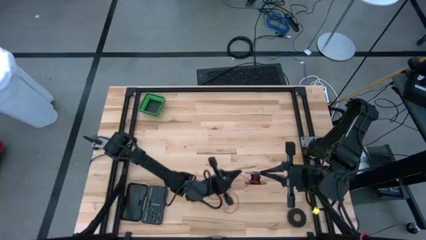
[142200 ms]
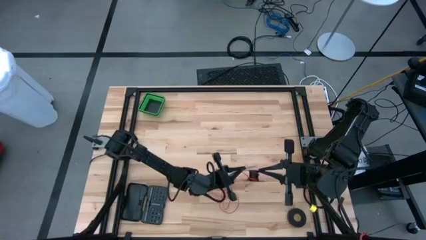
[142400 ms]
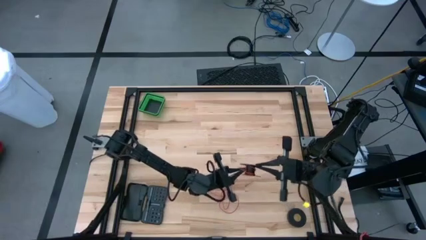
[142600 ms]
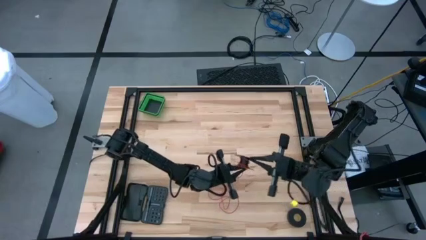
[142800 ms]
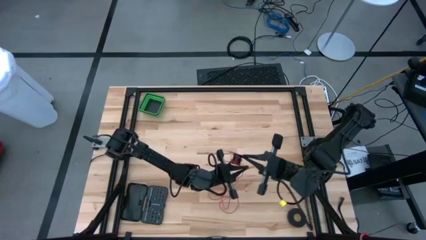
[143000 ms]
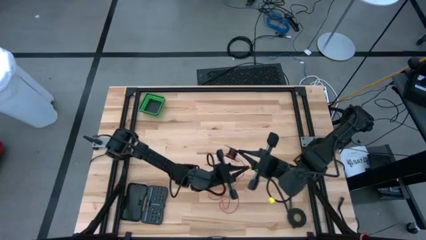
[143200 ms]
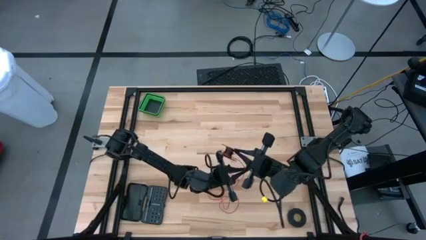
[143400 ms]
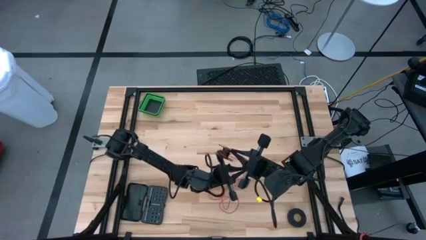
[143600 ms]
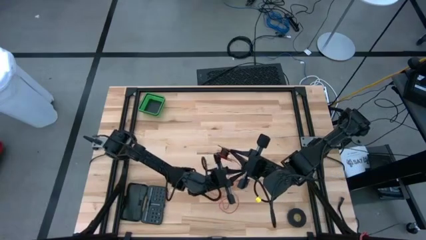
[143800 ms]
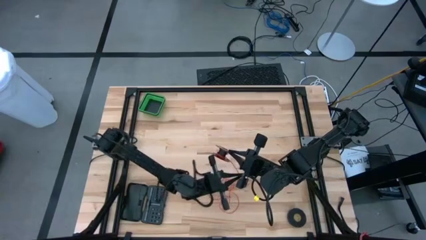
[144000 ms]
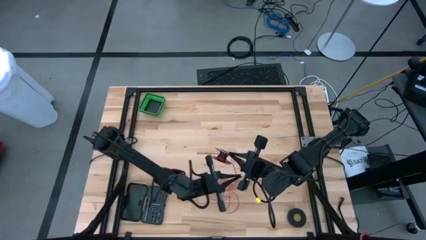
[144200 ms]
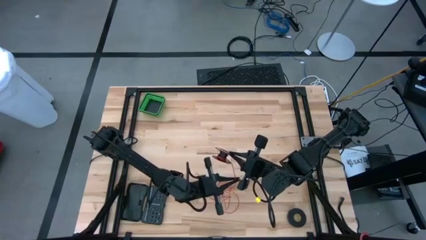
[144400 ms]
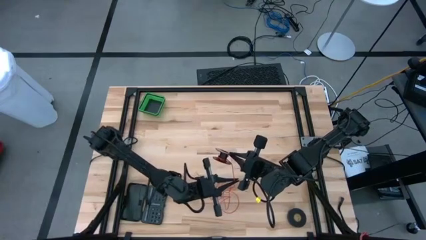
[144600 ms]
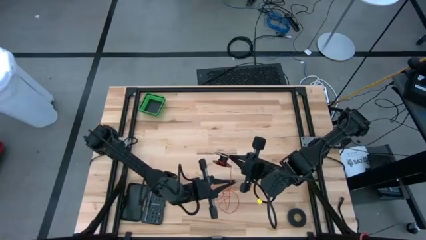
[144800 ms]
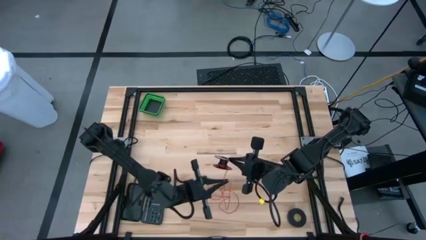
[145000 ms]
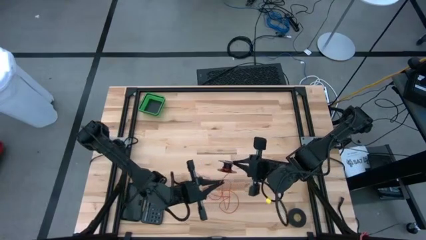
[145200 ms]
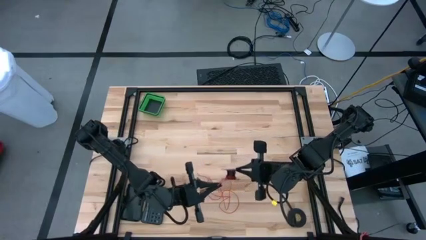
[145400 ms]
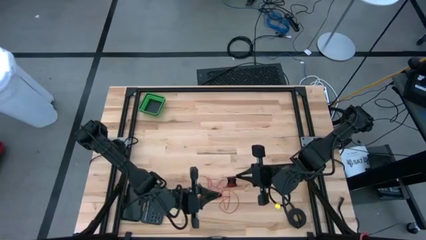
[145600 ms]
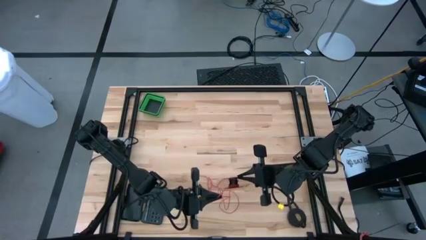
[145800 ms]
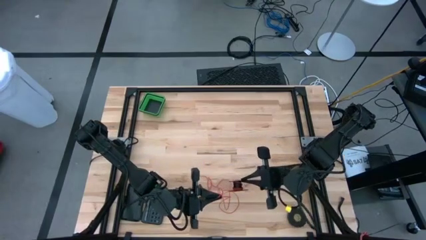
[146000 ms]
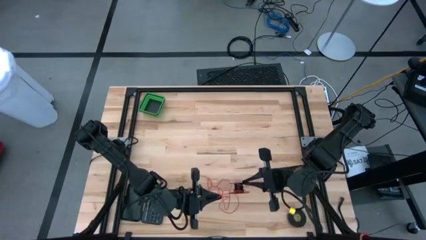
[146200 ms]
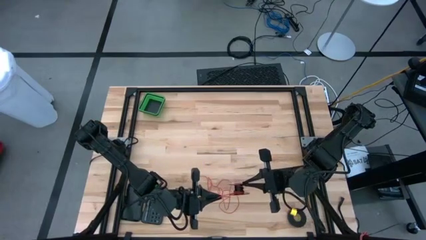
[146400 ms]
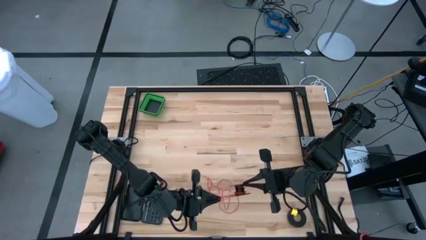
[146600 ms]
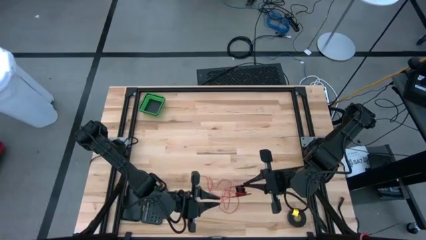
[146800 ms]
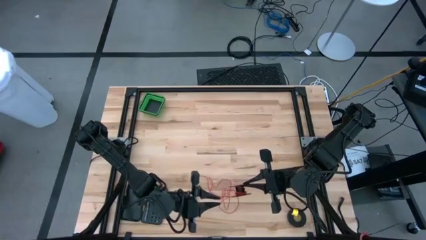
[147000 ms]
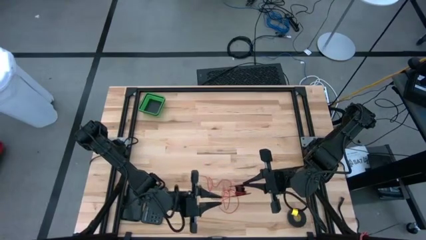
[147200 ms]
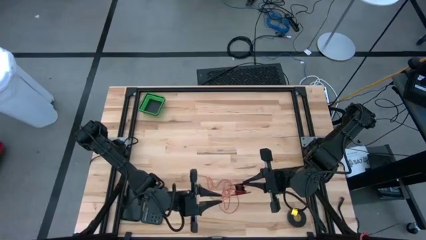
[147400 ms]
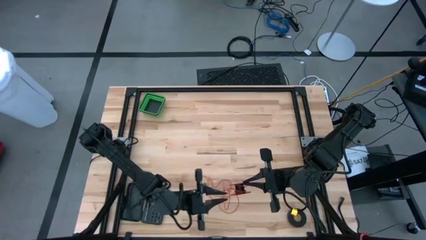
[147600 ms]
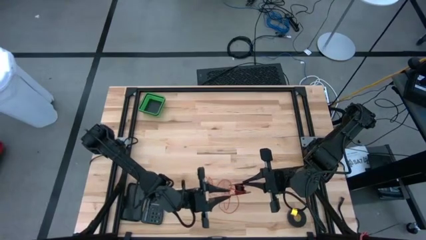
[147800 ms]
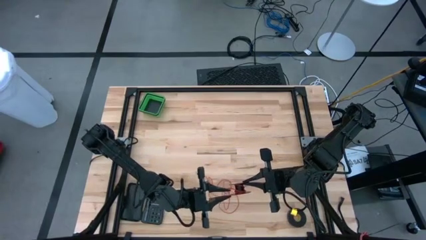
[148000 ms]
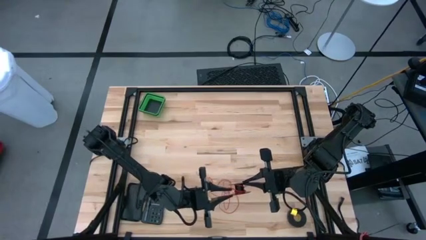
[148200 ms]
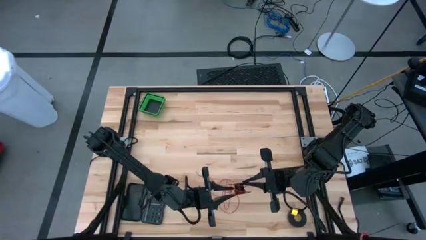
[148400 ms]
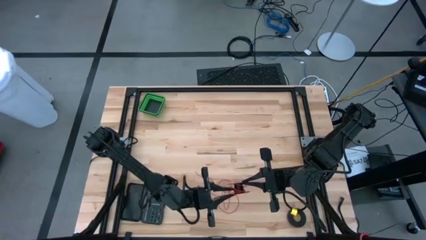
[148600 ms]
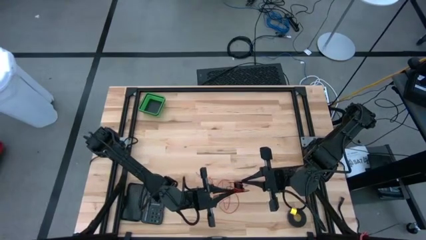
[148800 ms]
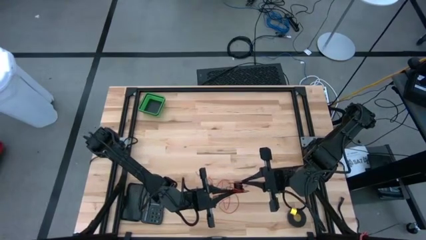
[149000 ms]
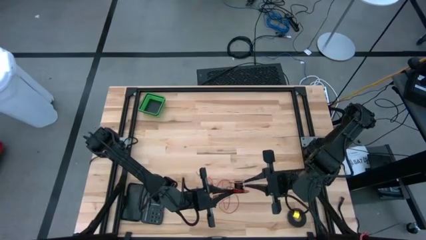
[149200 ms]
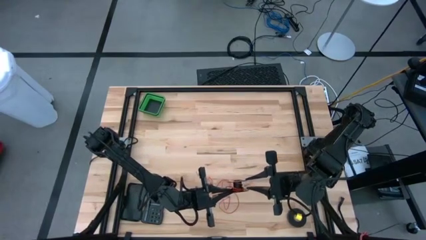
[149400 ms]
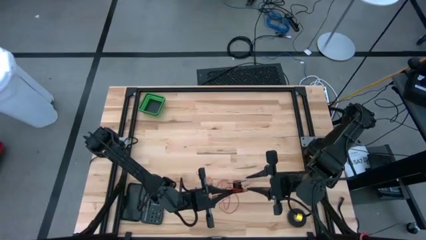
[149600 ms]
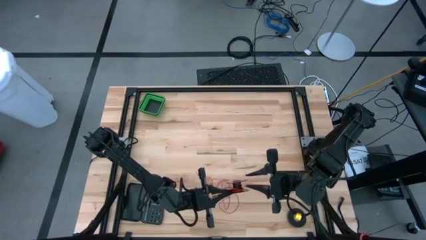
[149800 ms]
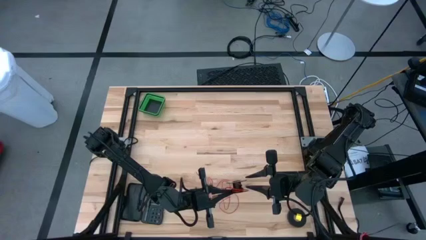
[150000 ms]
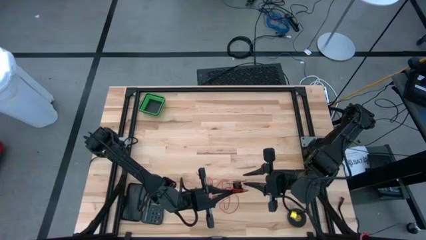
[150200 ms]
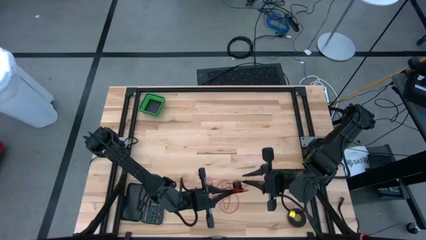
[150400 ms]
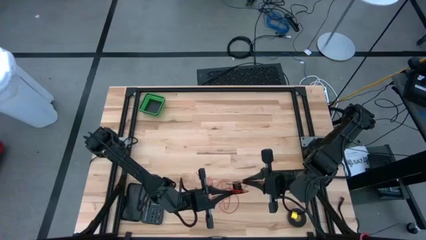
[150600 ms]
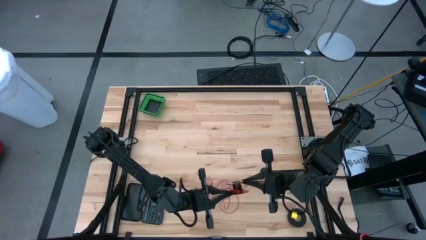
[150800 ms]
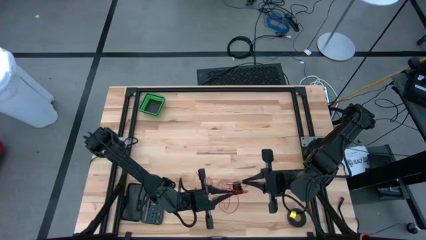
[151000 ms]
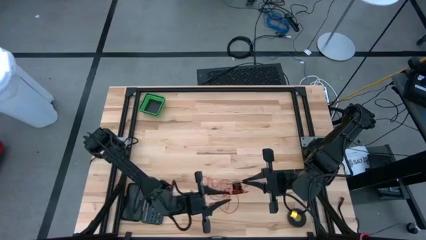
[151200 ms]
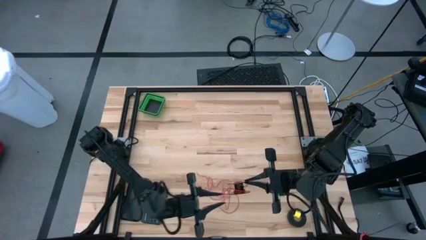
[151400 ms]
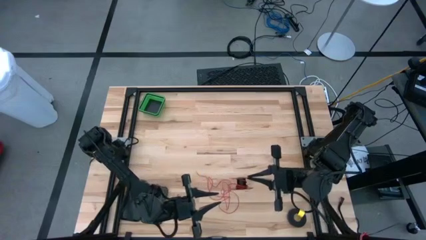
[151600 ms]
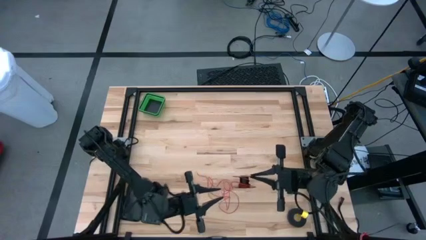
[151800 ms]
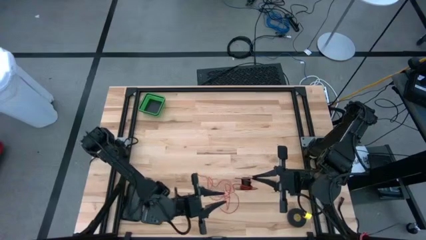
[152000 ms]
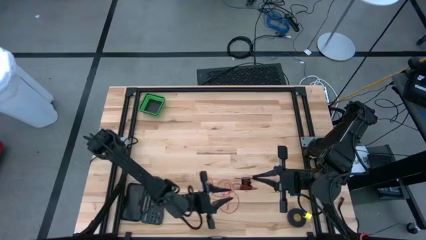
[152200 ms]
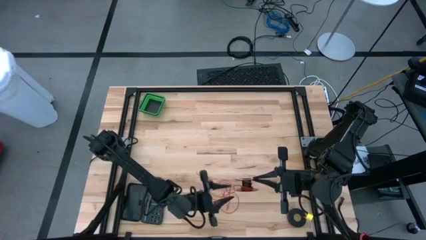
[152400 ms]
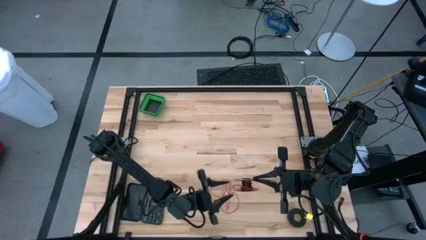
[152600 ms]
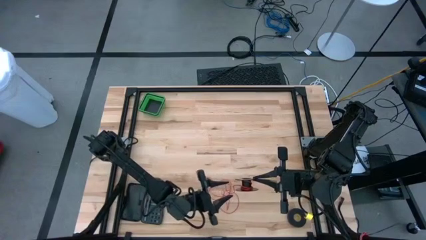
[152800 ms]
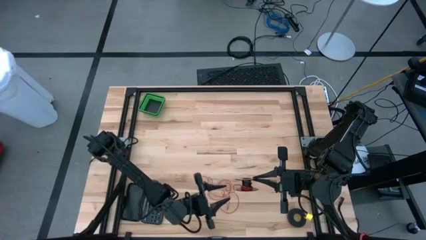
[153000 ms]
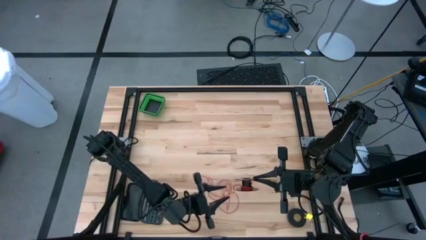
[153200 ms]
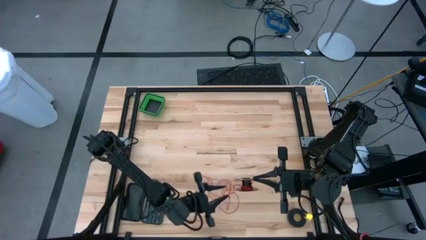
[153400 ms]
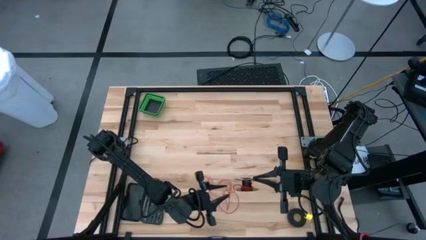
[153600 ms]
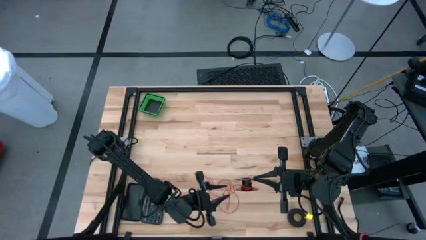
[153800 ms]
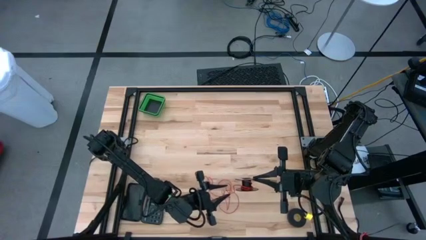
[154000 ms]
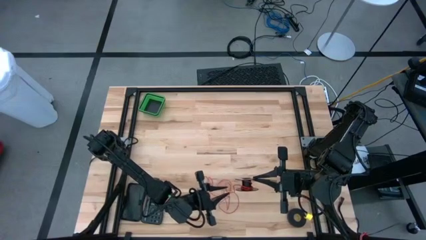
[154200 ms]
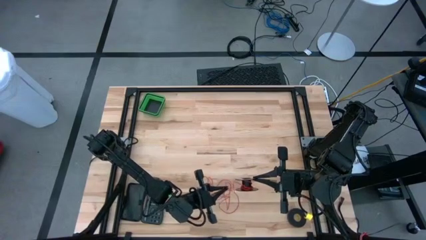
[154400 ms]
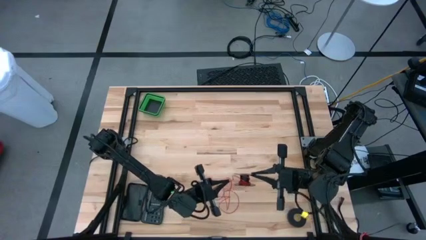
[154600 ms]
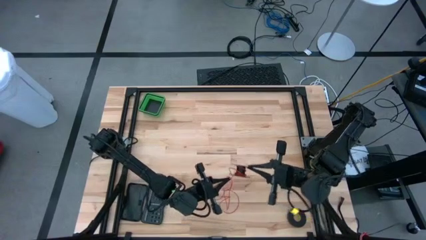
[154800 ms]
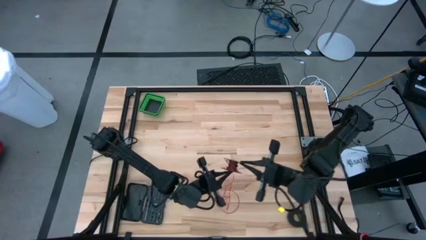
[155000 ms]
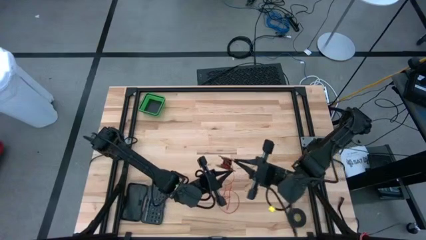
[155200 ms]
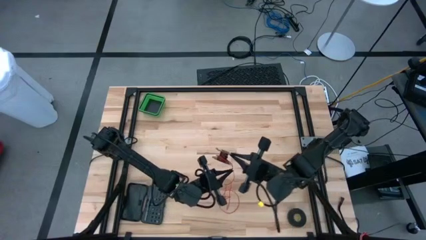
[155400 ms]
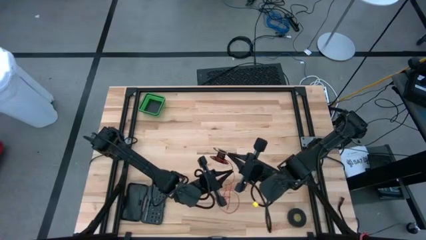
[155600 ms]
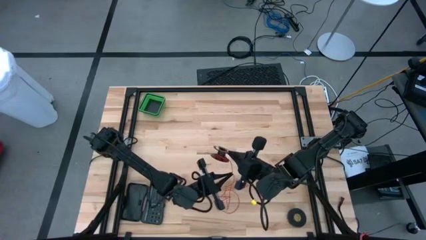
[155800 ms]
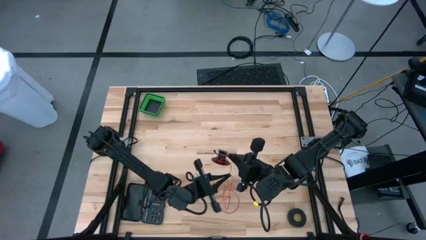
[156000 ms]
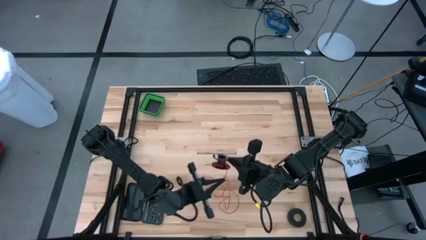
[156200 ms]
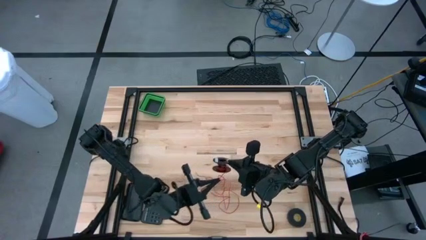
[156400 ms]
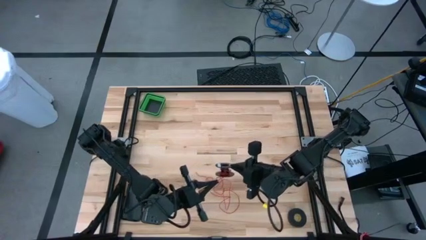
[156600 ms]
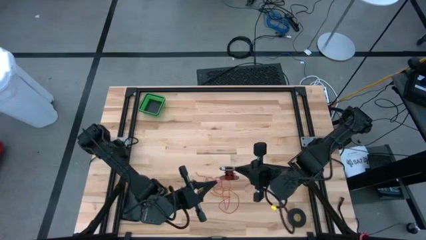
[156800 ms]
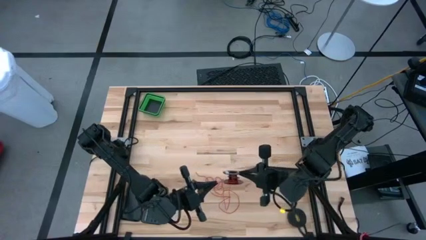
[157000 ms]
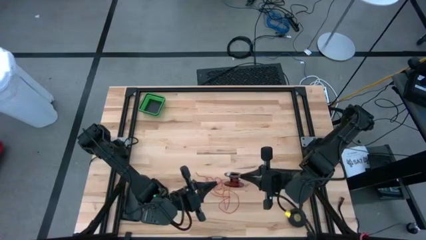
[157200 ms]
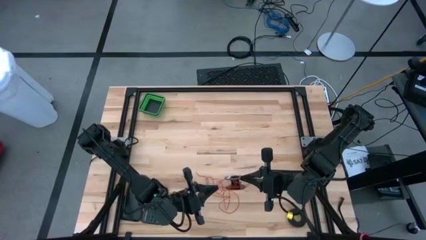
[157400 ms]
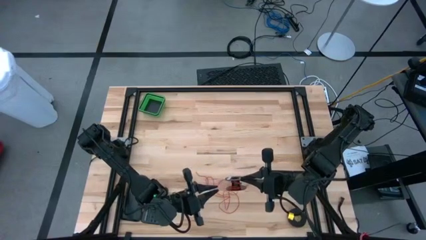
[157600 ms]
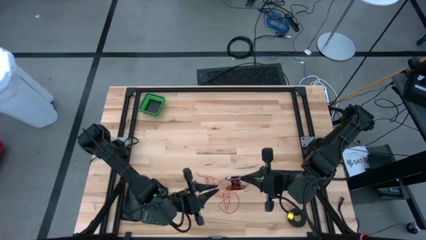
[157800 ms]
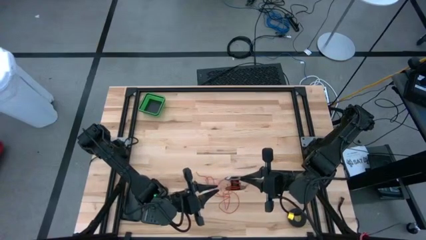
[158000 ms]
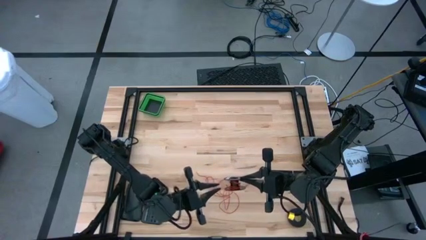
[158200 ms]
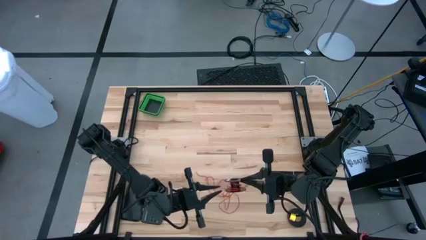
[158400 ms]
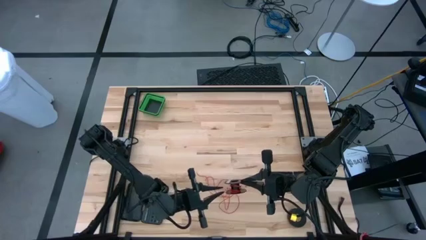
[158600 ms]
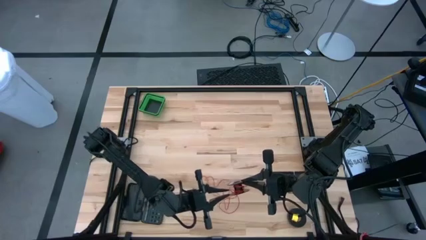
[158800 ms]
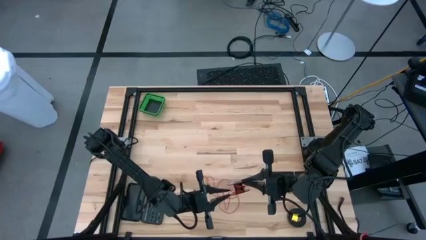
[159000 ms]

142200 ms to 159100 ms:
Task: Coil cords
Coil the red wire into the spool
